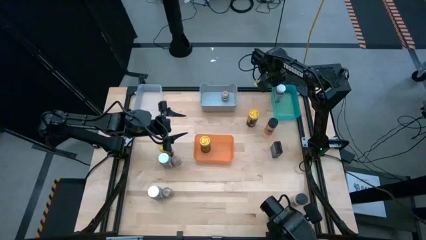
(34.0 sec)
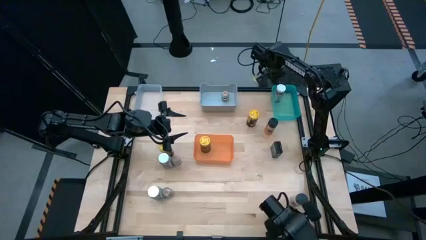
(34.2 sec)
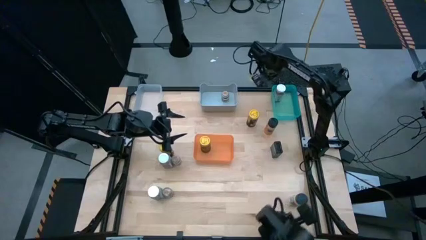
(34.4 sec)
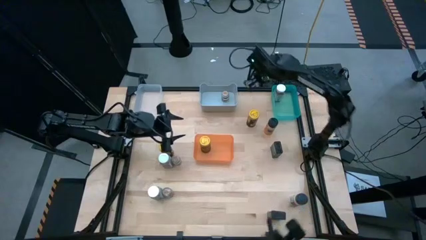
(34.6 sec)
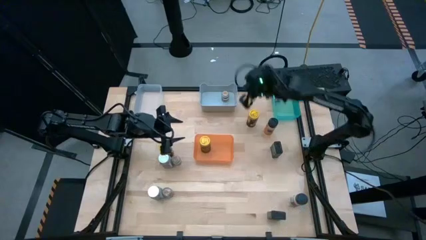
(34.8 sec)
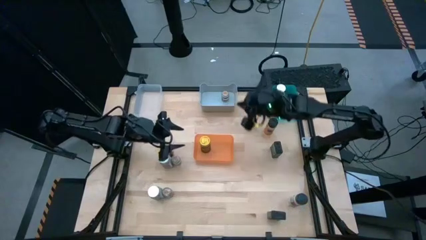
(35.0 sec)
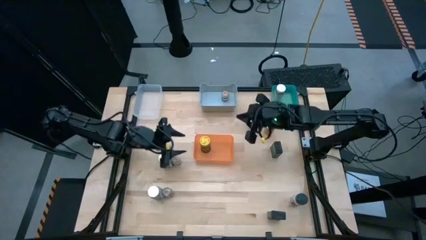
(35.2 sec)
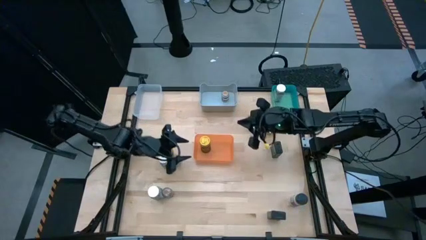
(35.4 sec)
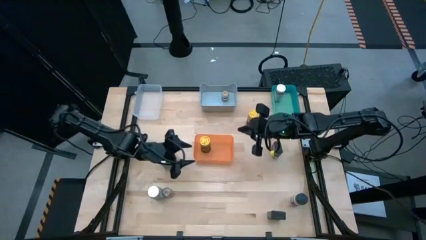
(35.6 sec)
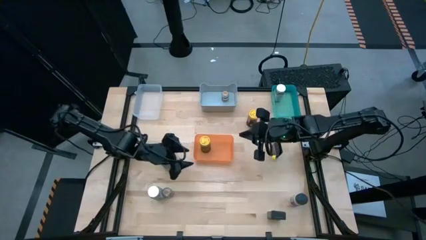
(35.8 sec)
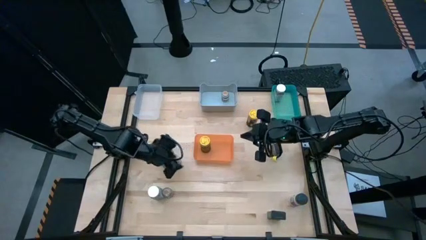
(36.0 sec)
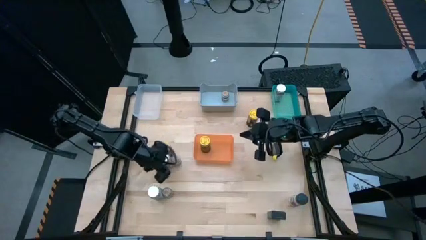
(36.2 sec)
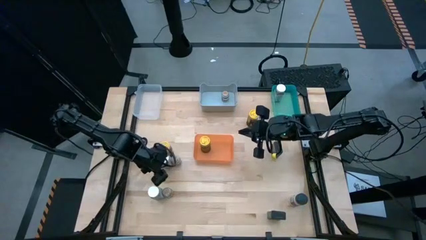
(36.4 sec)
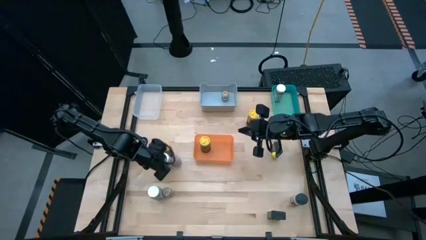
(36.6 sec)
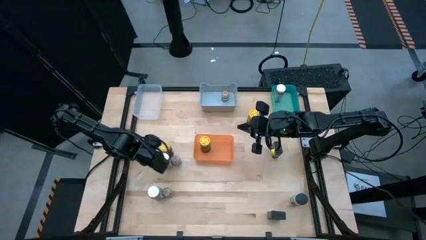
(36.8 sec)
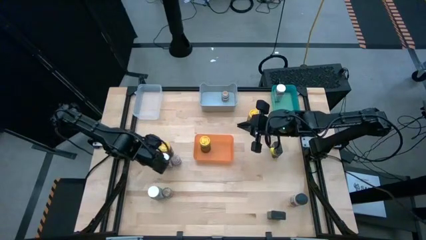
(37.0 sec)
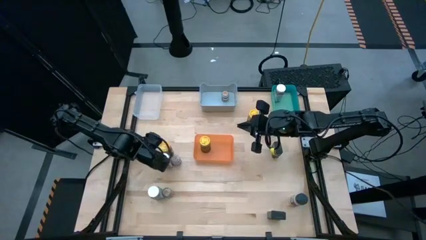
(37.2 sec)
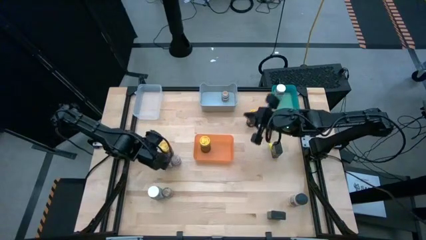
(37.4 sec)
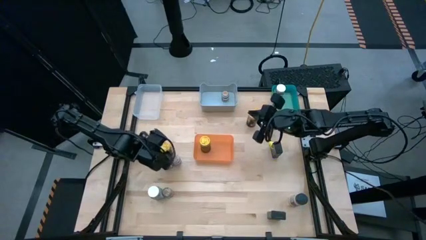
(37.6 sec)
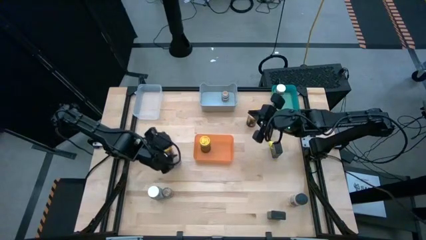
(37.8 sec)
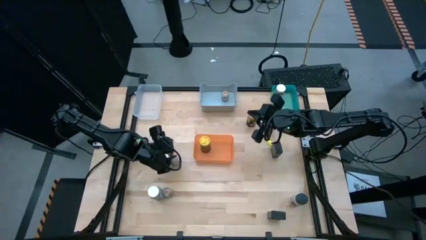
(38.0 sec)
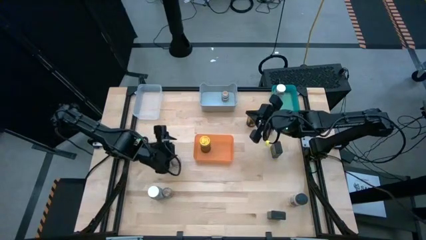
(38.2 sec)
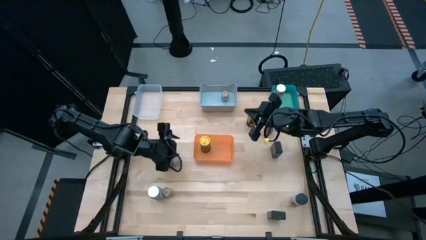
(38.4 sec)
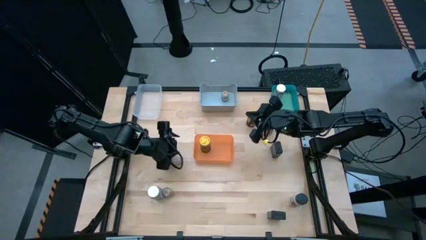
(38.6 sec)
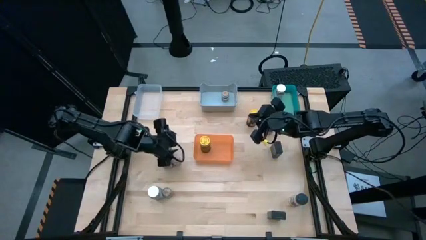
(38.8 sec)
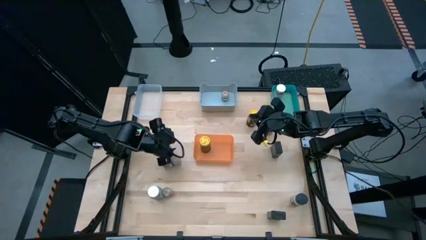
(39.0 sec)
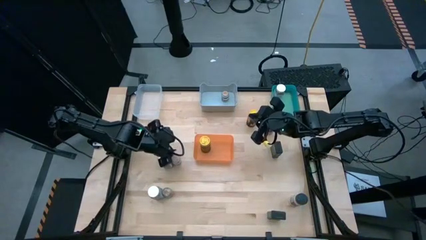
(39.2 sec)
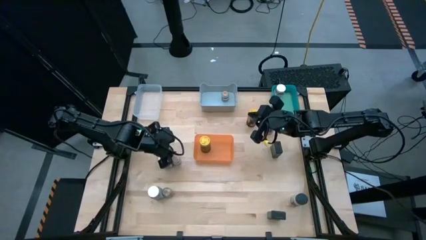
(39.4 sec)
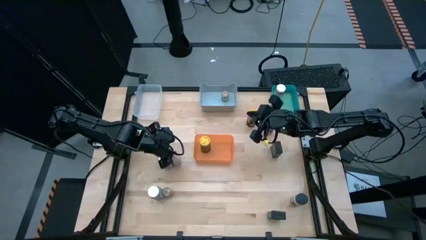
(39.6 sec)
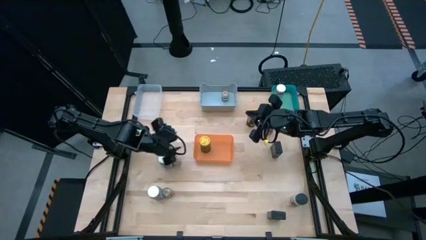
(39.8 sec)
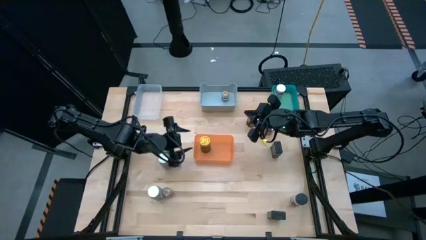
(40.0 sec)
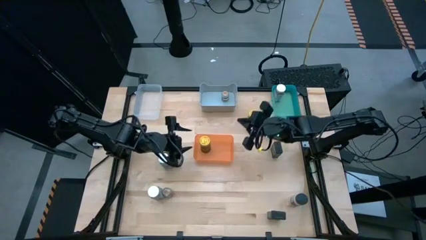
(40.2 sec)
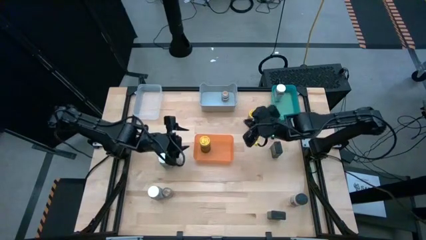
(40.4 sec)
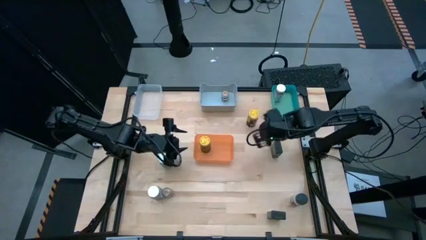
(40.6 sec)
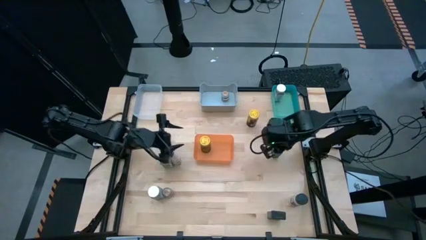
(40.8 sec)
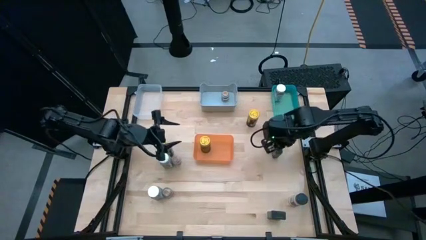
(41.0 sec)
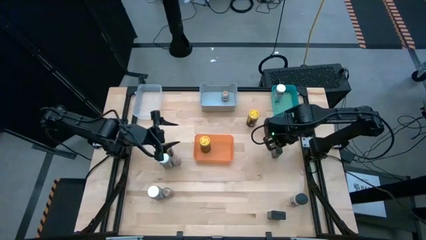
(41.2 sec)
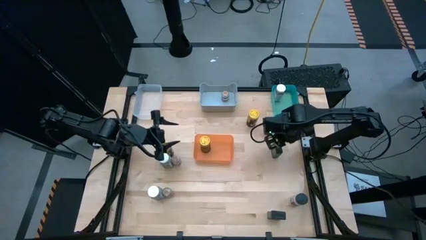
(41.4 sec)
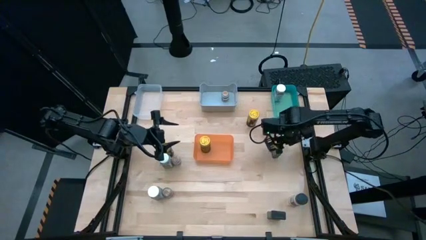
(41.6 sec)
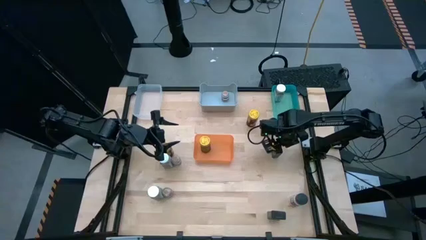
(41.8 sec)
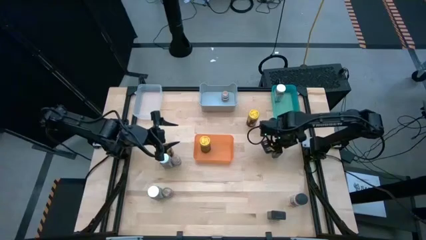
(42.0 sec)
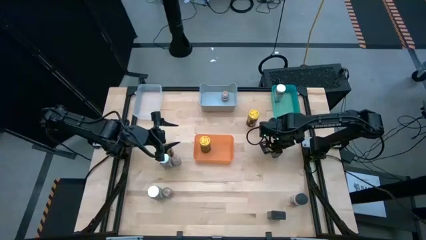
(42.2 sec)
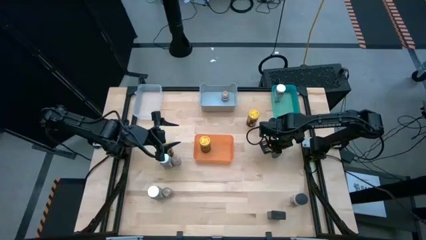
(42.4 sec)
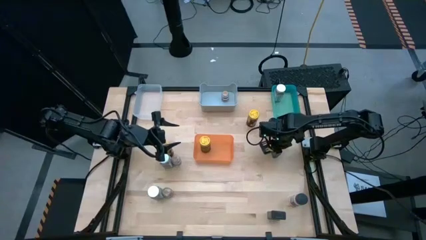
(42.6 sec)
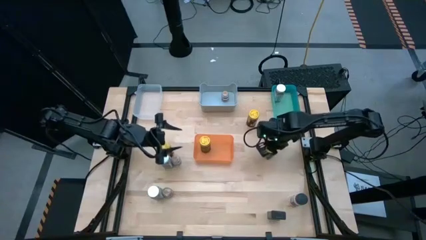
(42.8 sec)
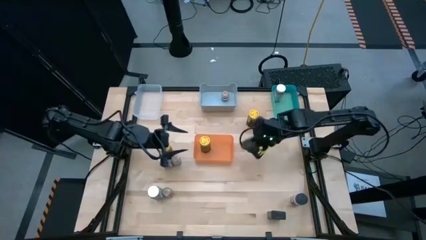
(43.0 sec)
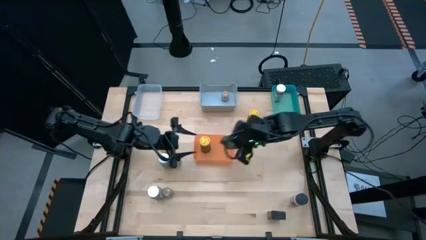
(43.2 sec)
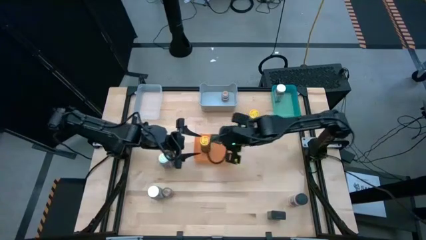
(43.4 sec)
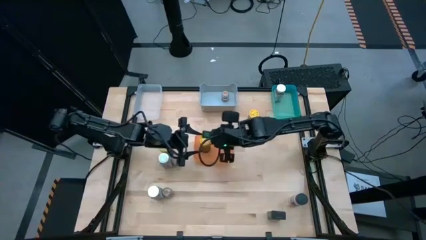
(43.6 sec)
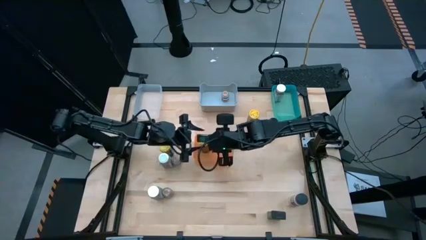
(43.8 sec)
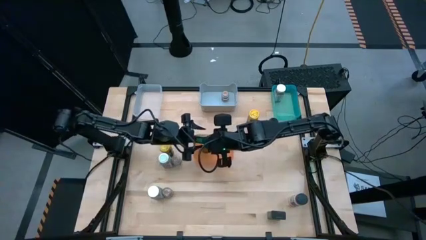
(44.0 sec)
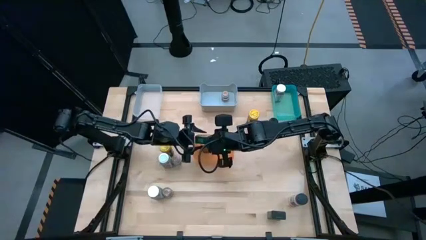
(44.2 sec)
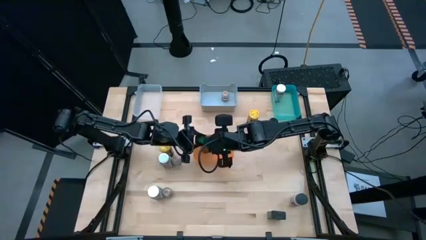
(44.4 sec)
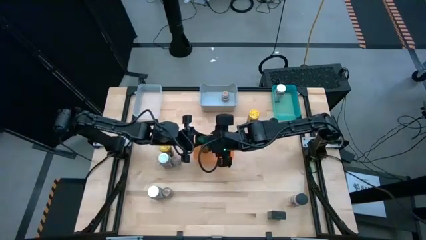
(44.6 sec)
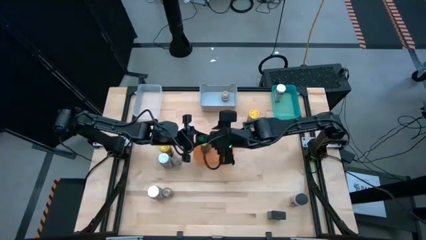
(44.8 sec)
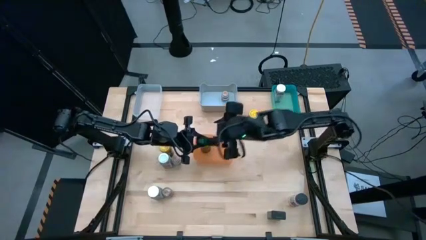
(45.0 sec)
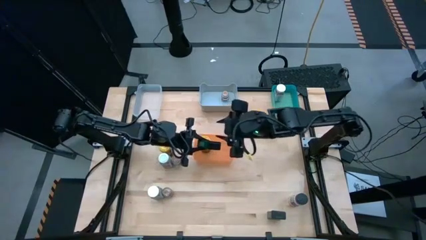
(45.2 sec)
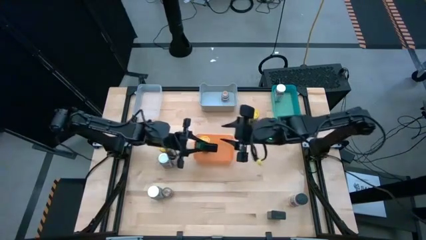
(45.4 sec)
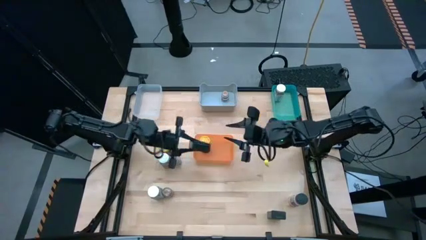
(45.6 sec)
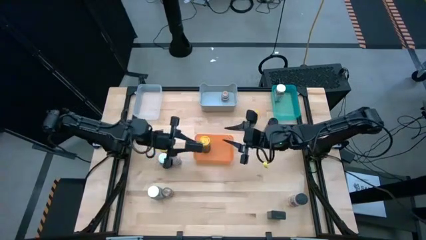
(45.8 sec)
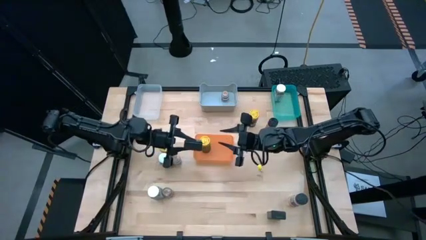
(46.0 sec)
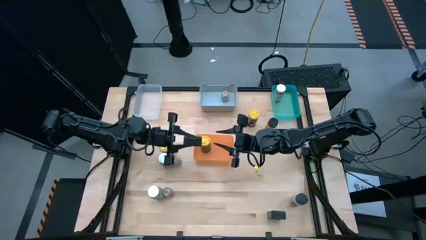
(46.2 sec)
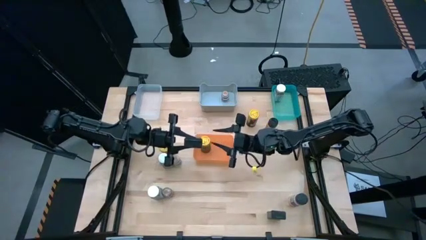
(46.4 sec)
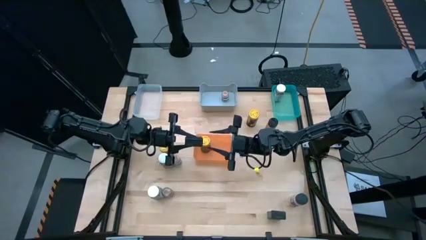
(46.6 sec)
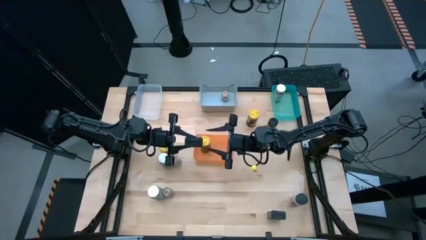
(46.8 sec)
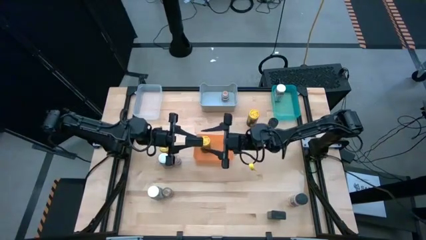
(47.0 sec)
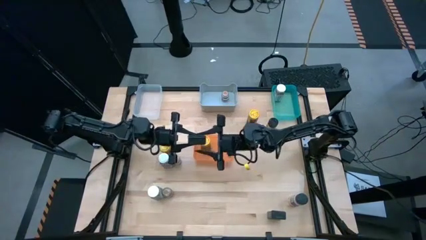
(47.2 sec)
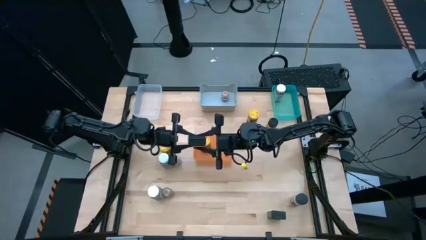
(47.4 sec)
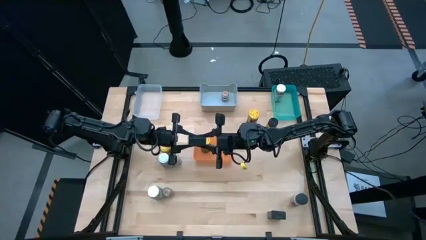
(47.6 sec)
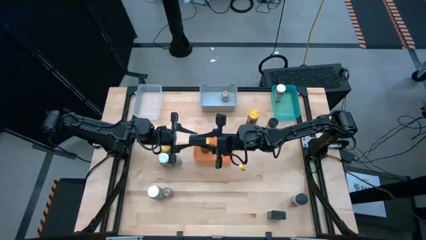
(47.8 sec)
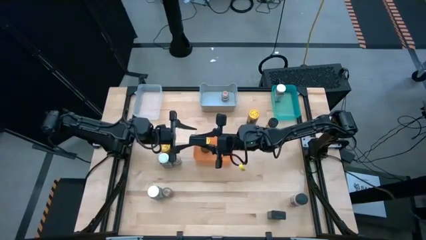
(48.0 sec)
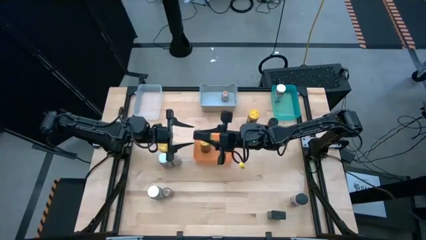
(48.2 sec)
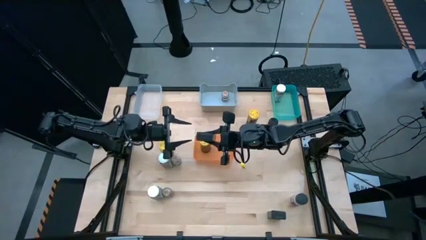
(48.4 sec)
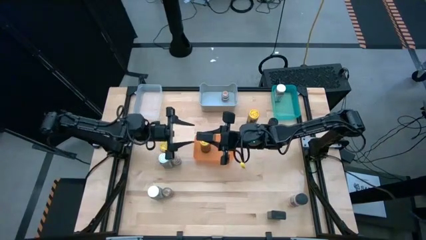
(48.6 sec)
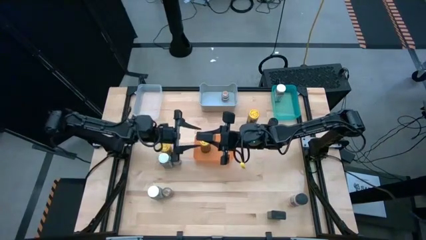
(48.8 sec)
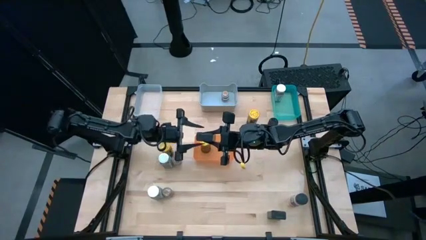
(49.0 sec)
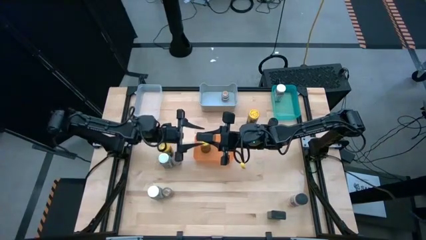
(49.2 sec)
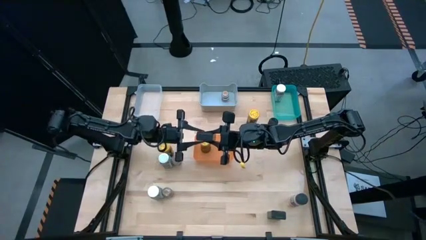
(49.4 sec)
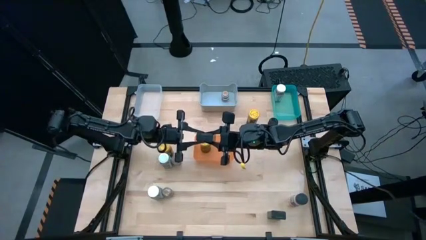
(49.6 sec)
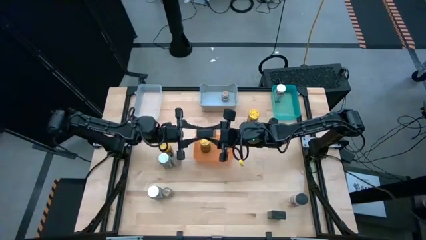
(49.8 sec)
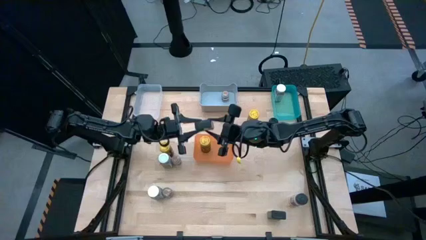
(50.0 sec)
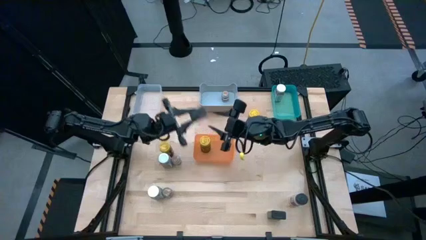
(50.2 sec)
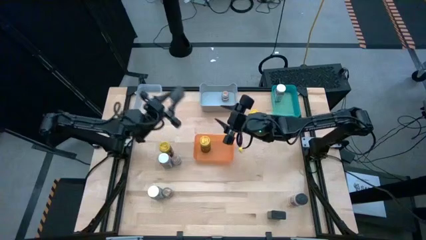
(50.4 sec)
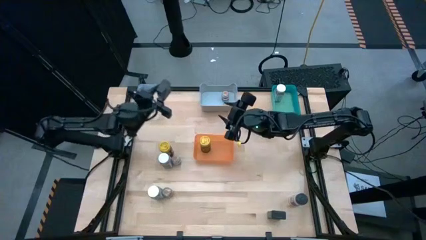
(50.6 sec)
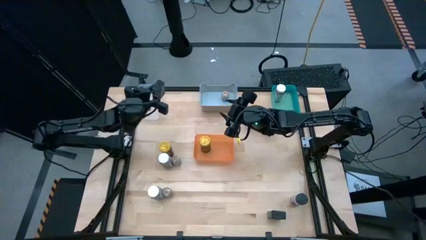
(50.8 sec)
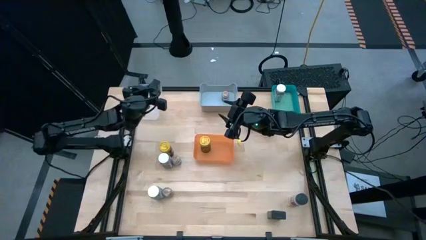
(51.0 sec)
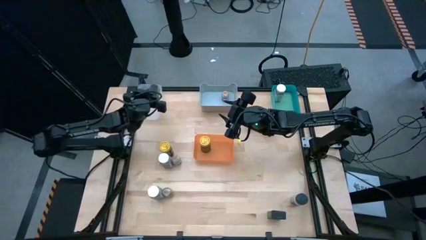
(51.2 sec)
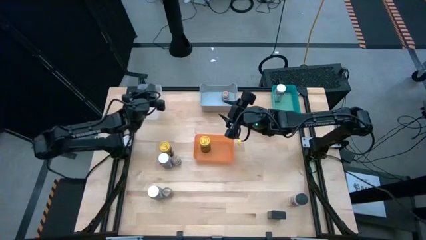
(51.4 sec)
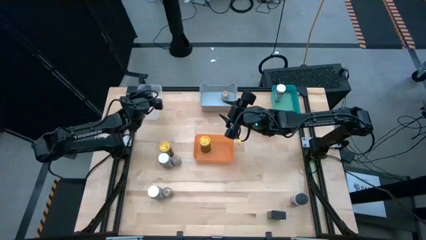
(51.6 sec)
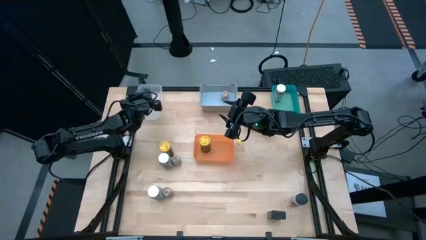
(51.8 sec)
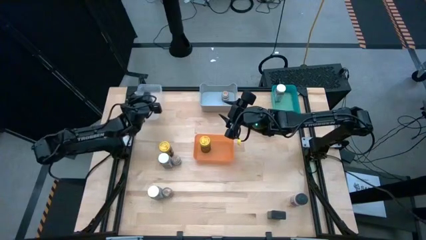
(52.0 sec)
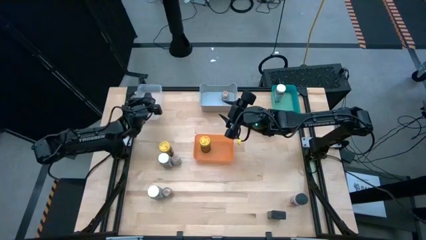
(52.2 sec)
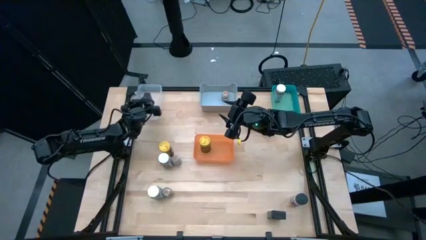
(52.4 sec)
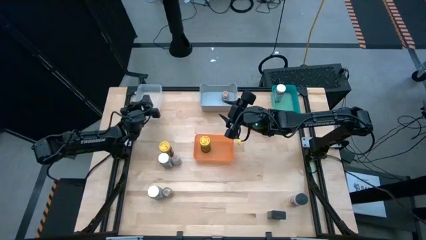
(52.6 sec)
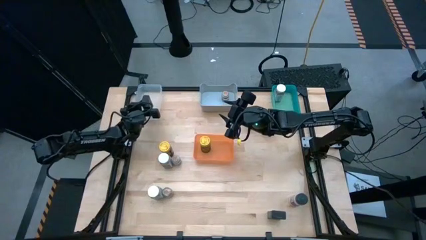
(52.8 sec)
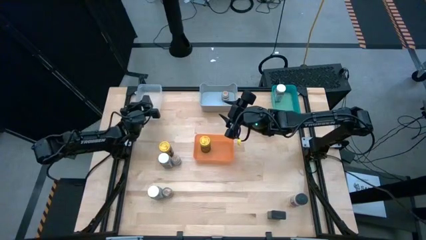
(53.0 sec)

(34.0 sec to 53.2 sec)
Task: Sort spices by type
Put the top black seasoning can into the transparent bin
